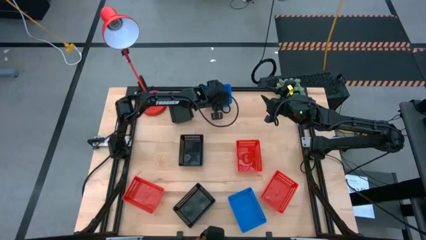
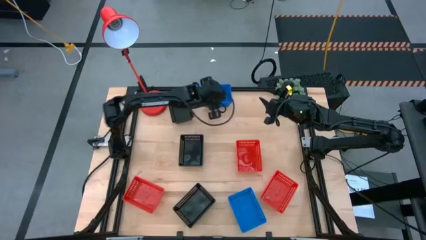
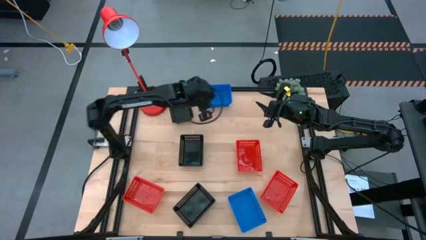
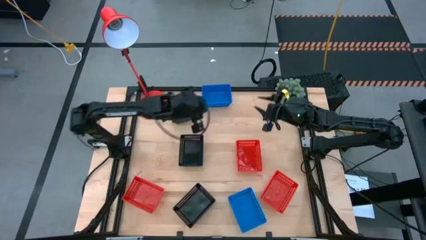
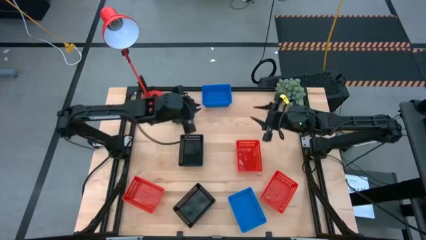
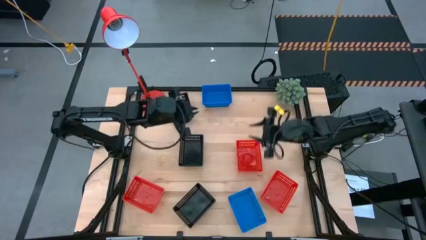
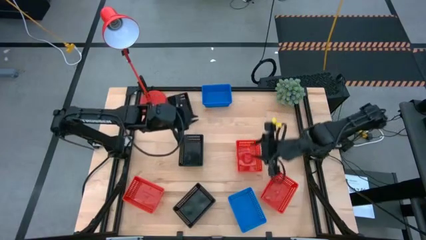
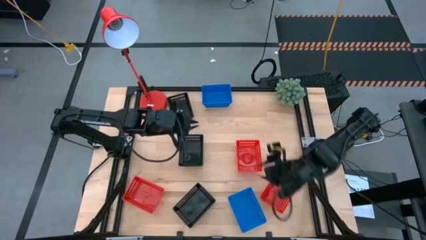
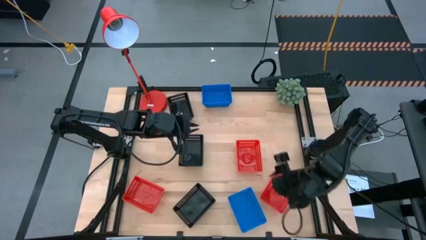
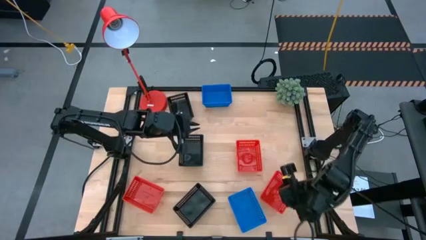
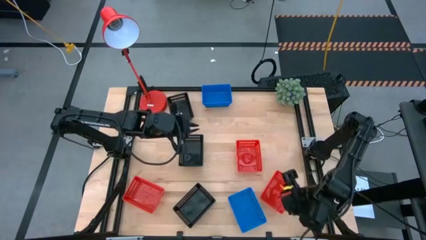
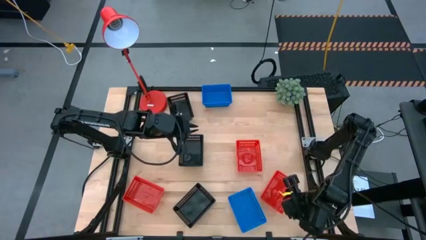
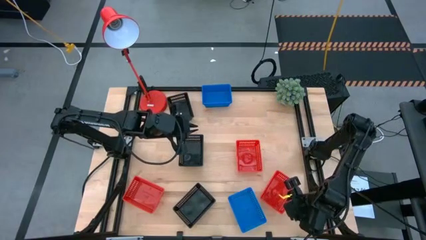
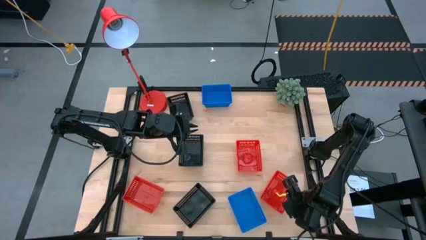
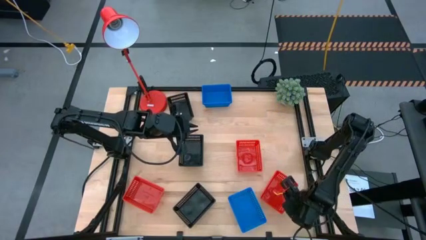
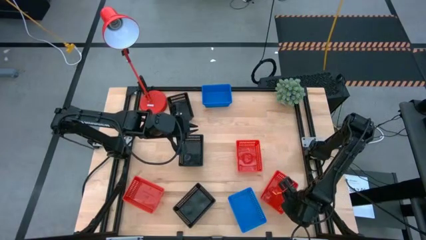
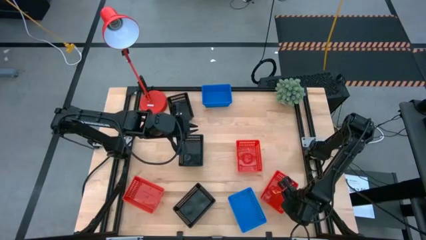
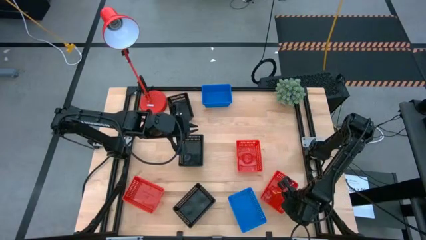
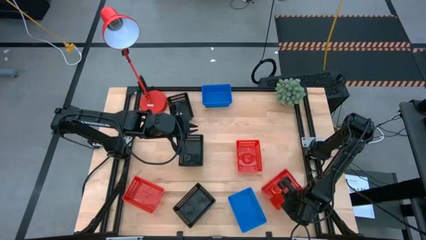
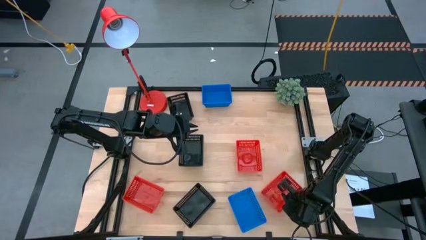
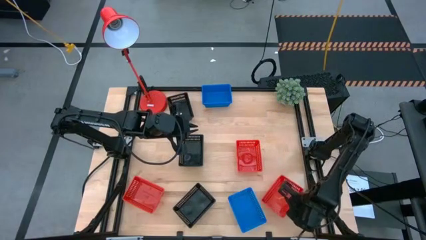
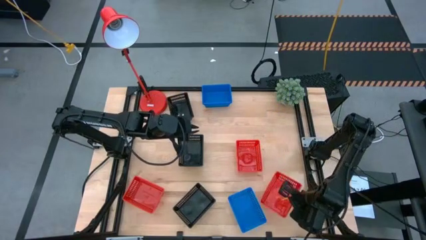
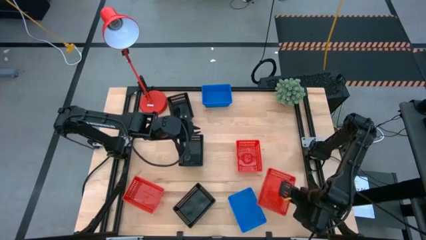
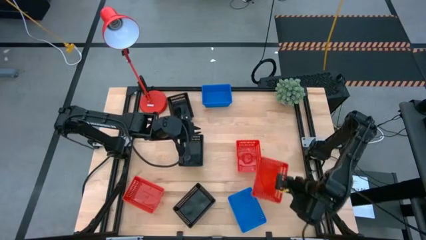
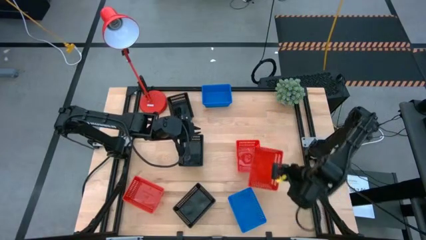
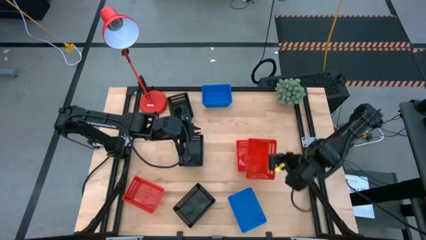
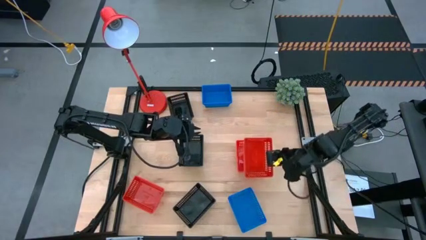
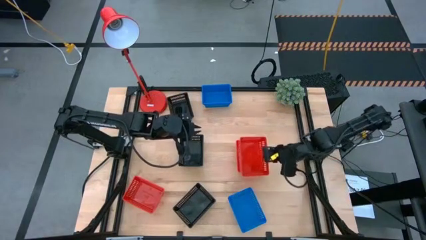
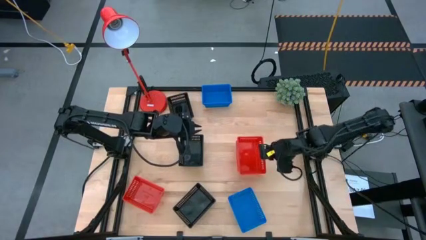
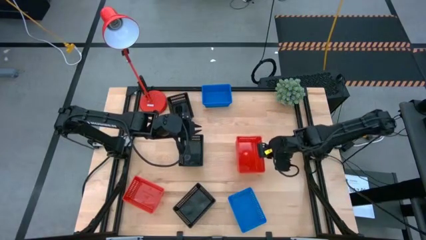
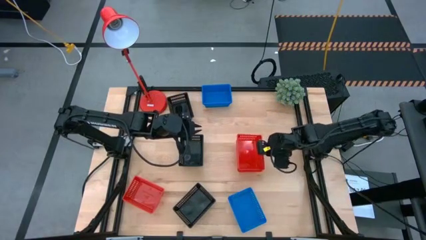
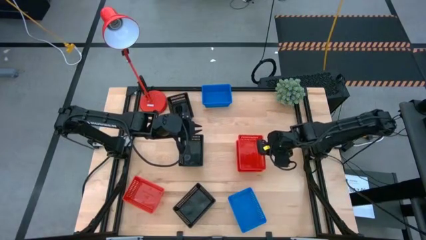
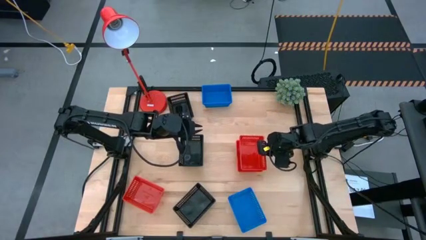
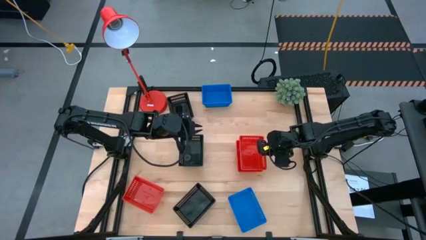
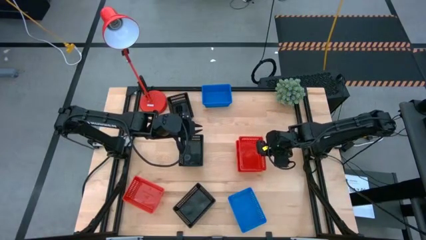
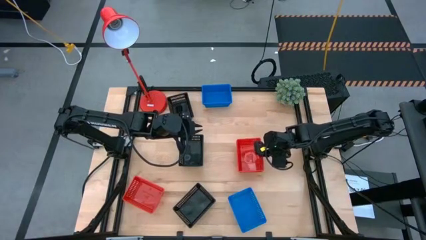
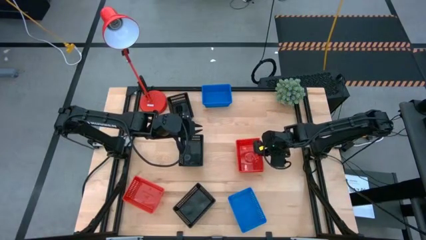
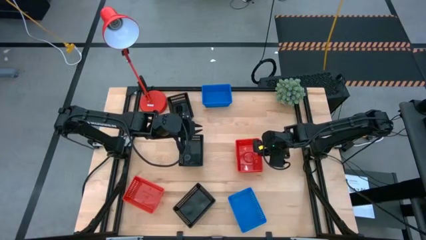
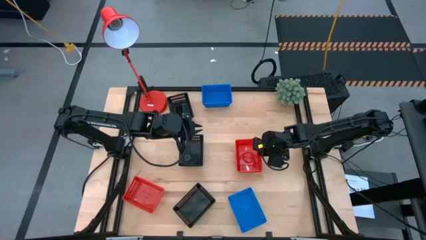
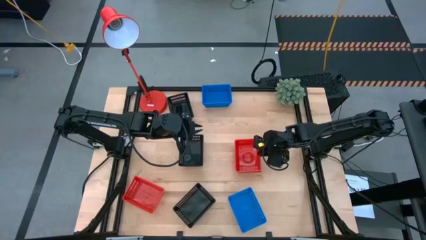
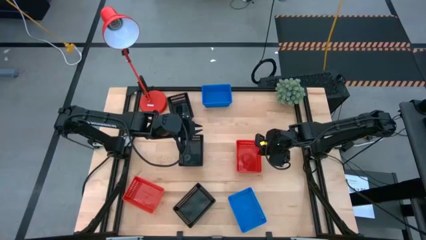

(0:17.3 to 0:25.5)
Stack the bottom right red bin on top of the top red bin

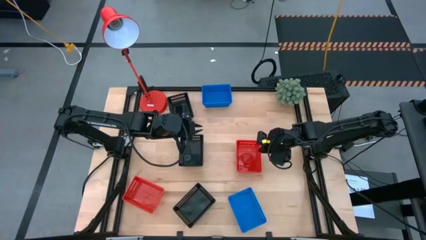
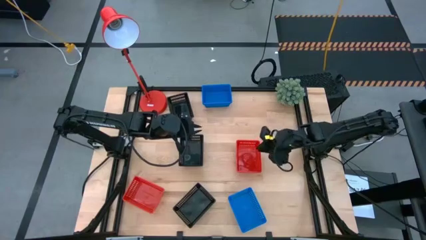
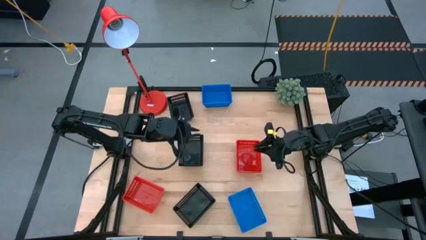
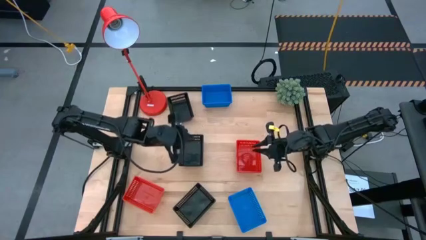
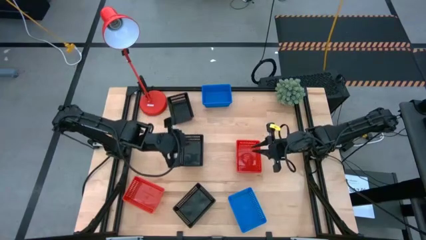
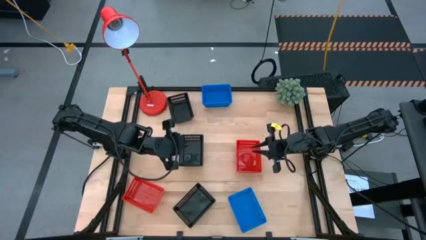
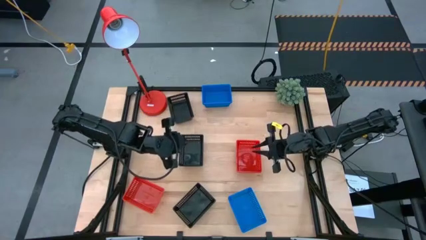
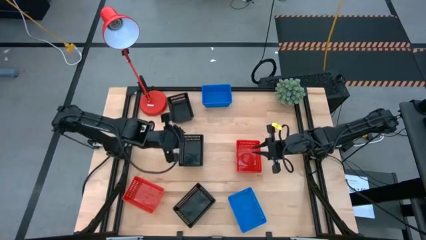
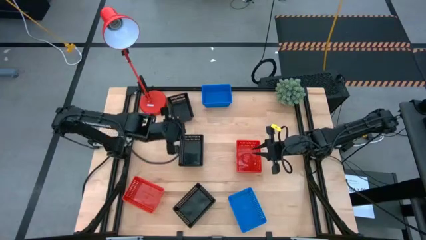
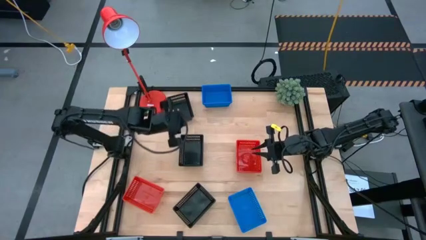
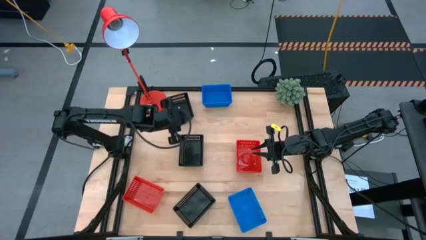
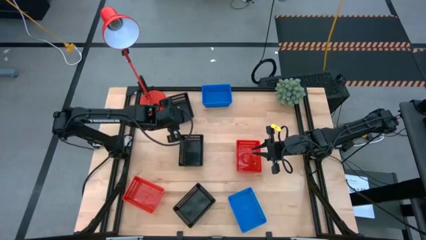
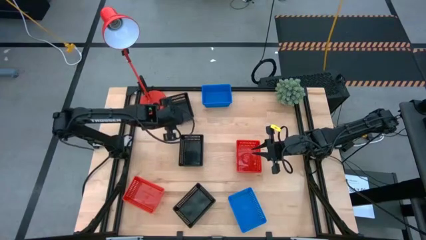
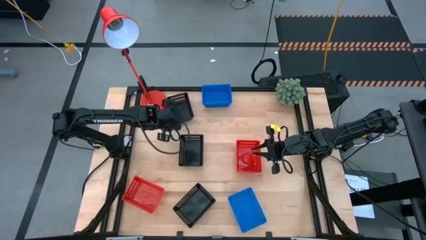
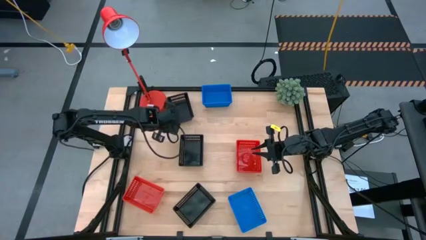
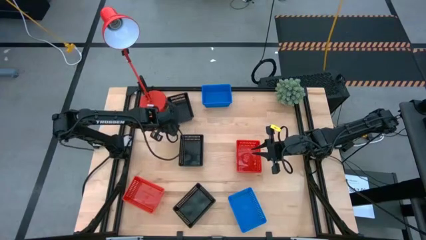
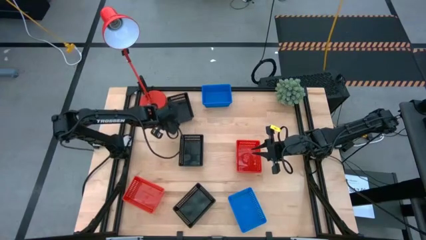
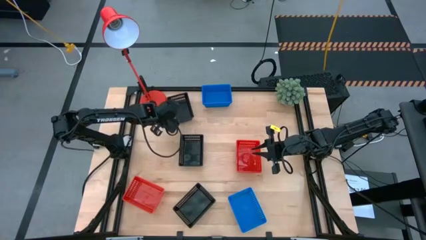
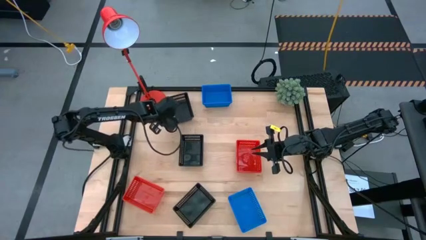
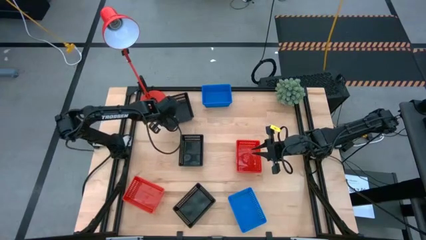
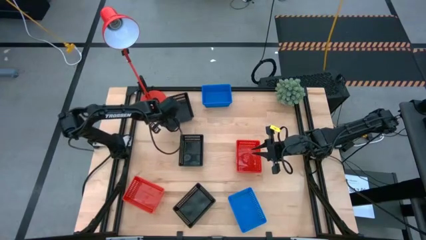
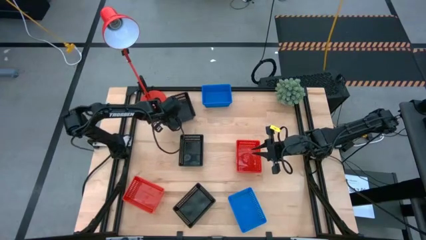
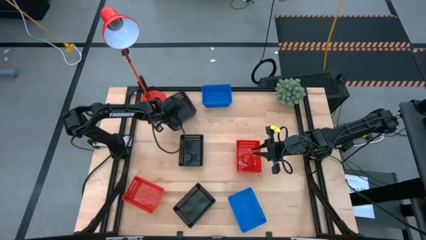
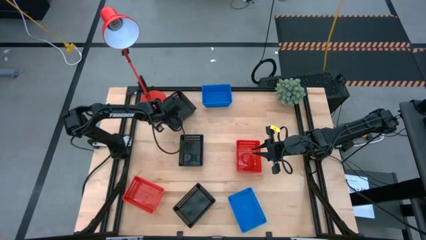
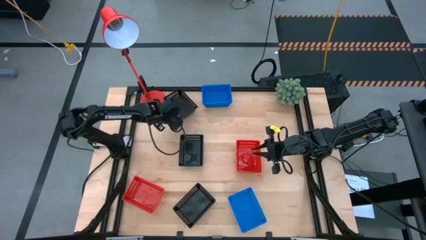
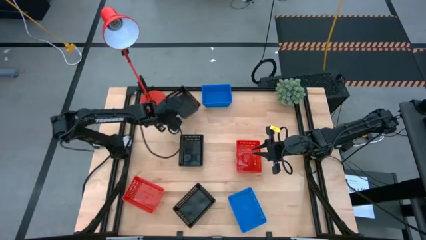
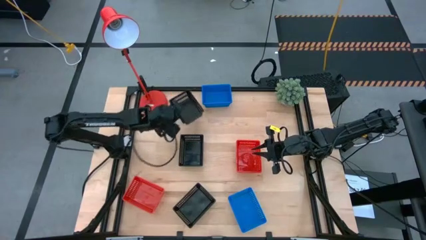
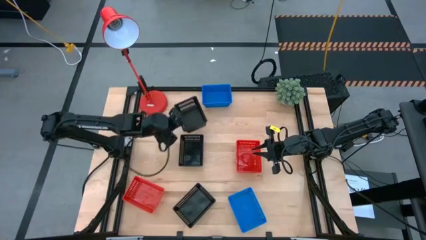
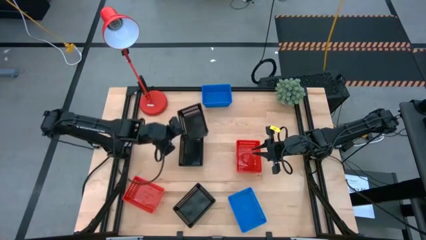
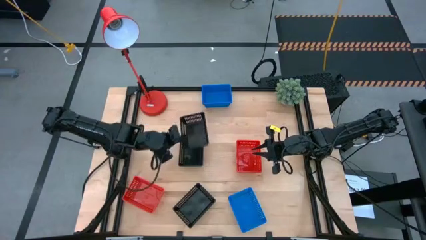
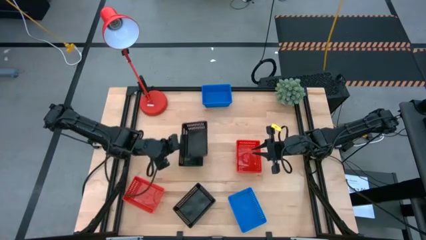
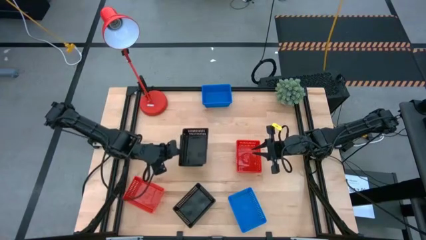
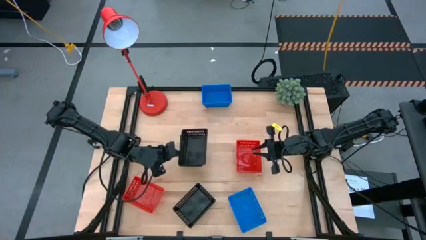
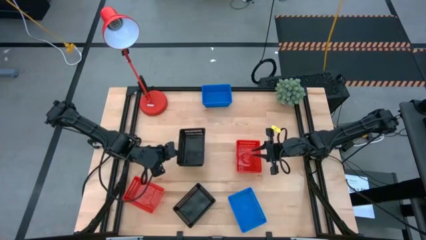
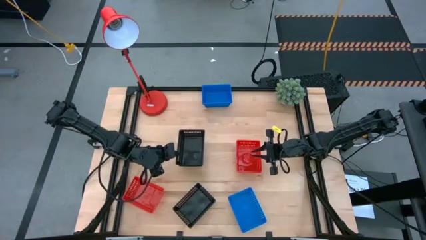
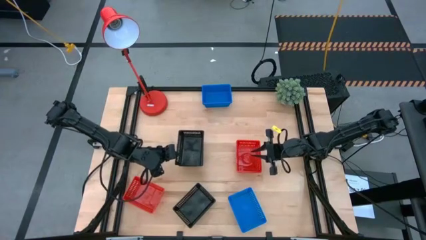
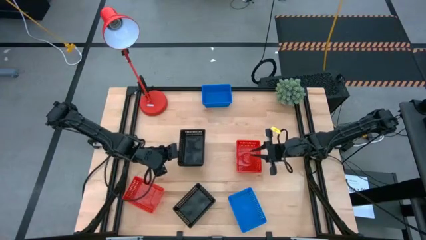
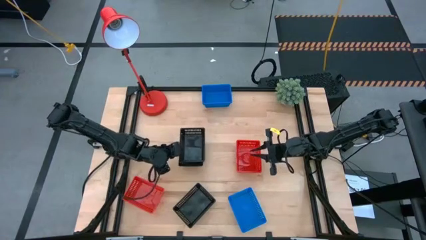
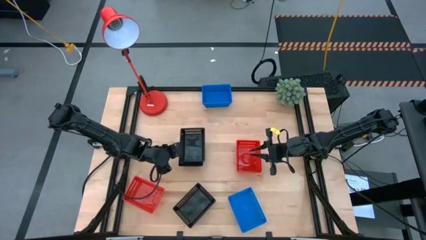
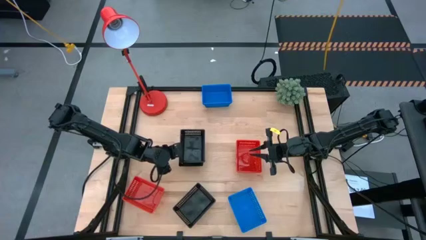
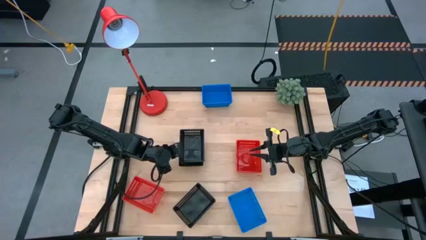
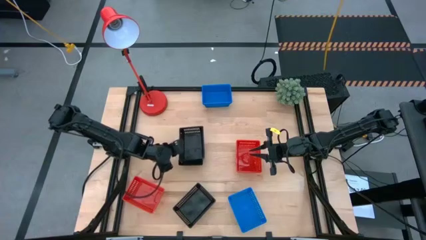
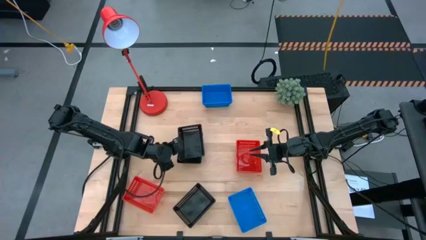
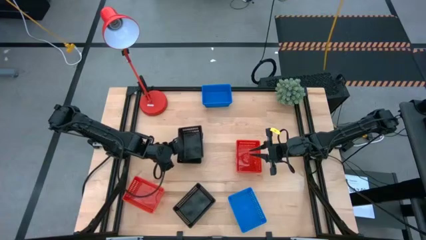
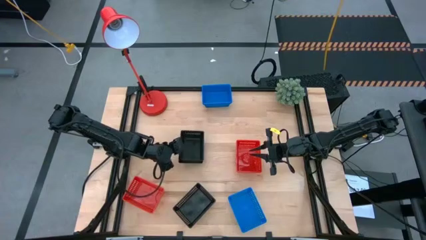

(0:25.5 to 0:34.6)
Stack the top black bin on top the middle black bin
